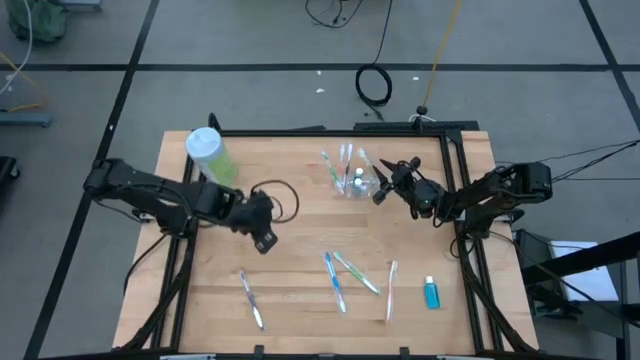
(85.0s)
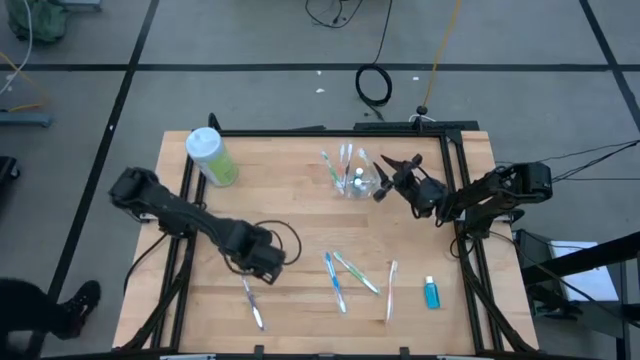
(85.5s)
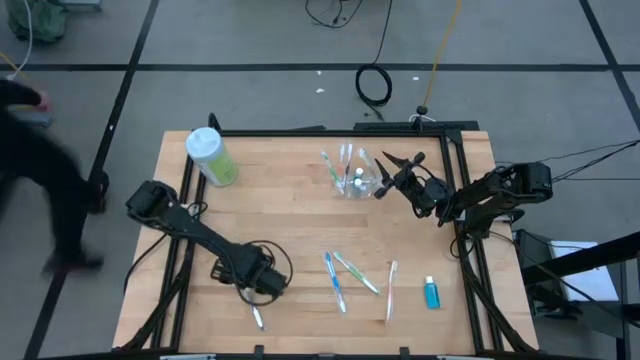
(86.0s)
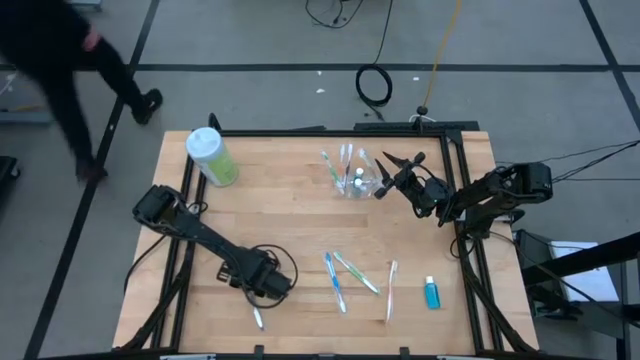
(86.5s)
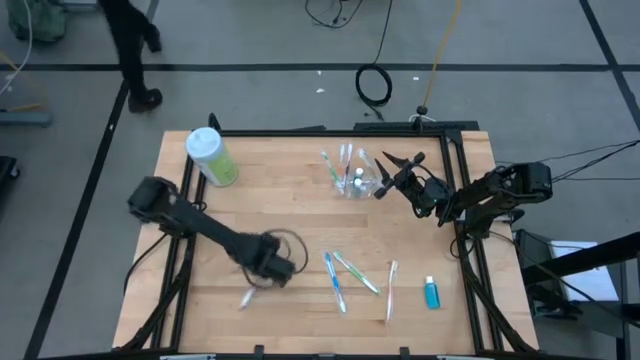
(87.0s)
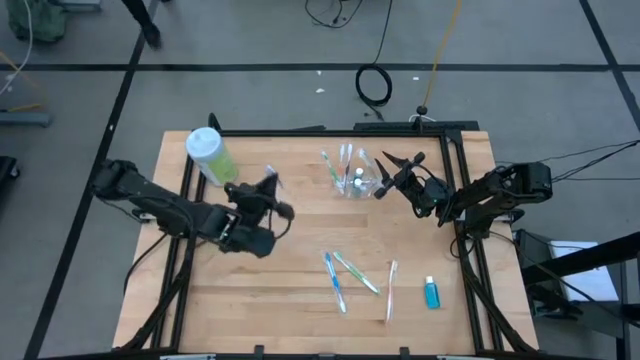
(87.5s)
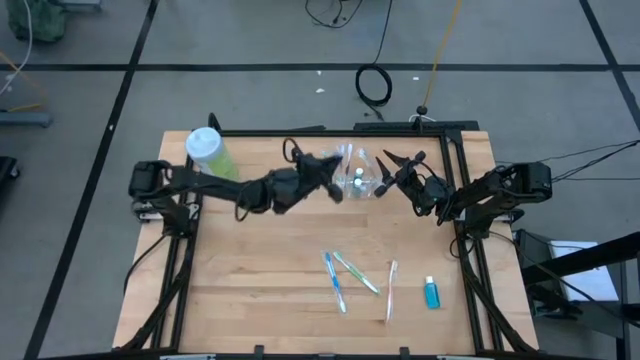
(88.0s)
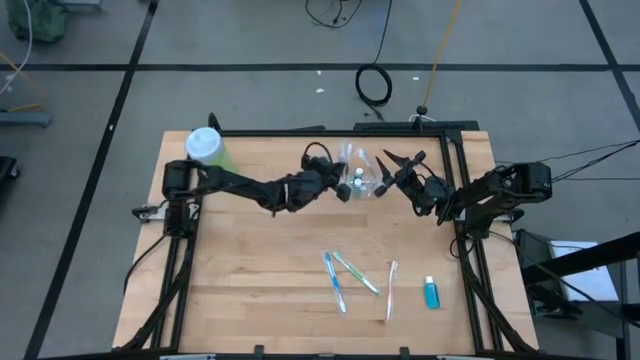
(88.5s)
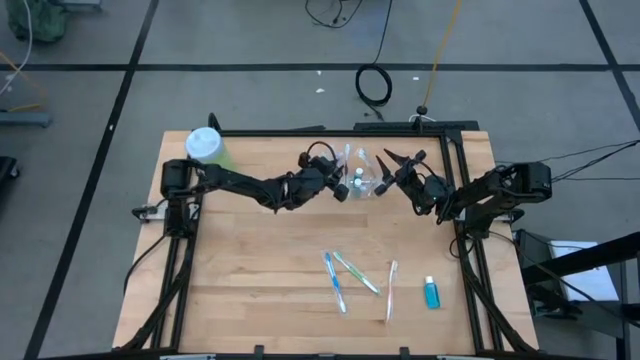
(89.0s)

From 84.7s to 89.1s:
Task: Pick & Place toothbrushing station
Put the violet toothbrush into the transparent organizer

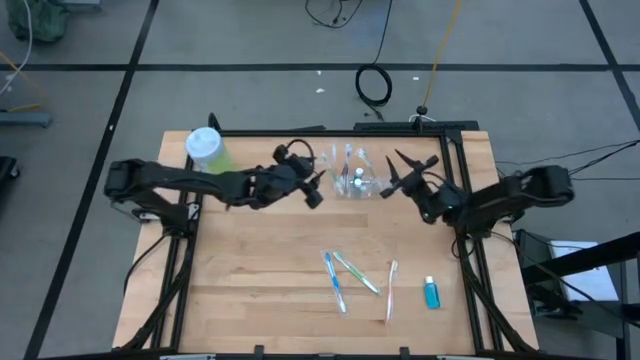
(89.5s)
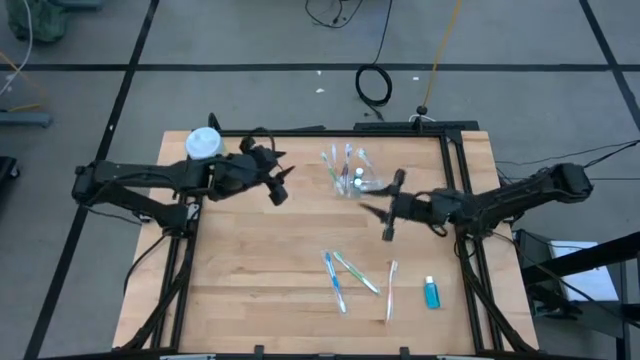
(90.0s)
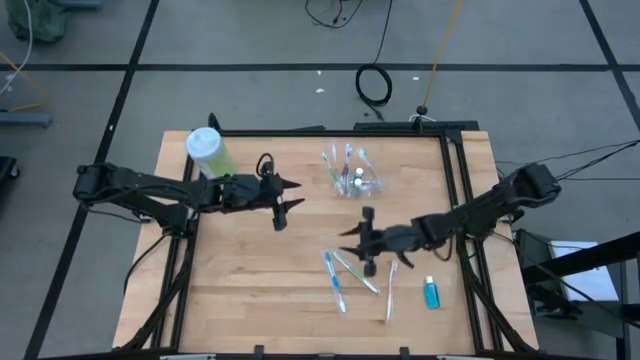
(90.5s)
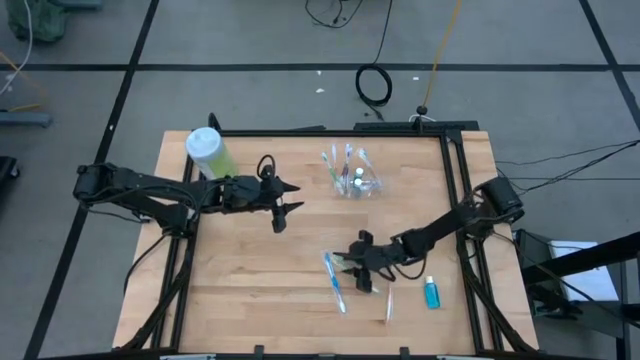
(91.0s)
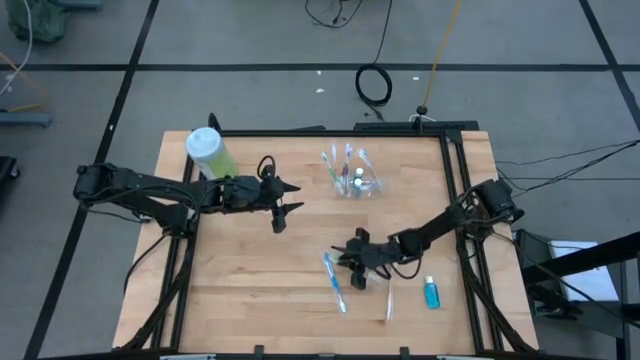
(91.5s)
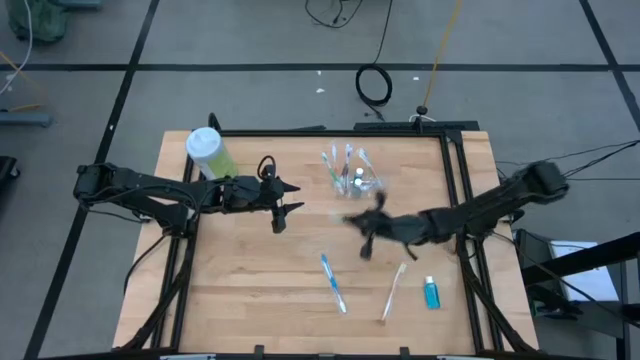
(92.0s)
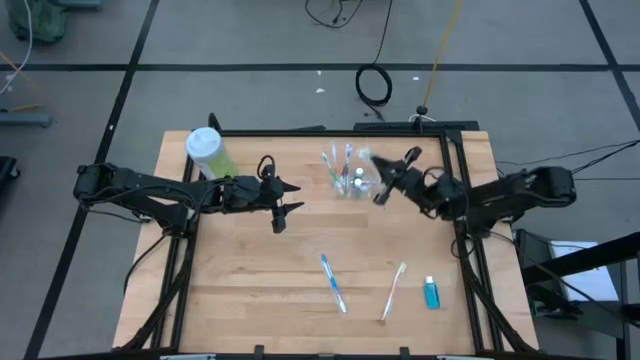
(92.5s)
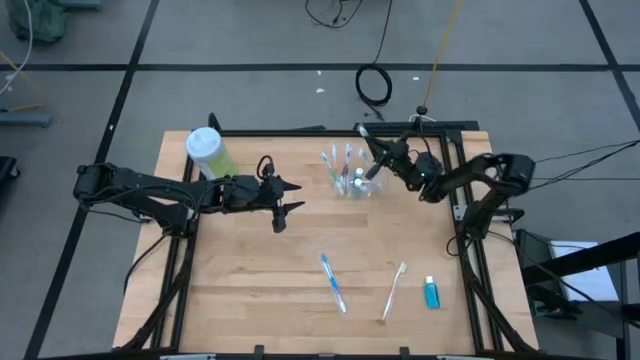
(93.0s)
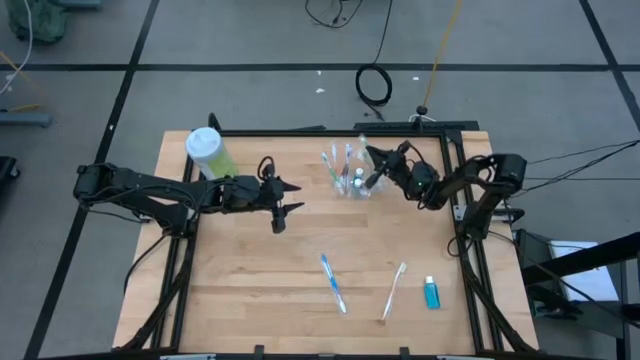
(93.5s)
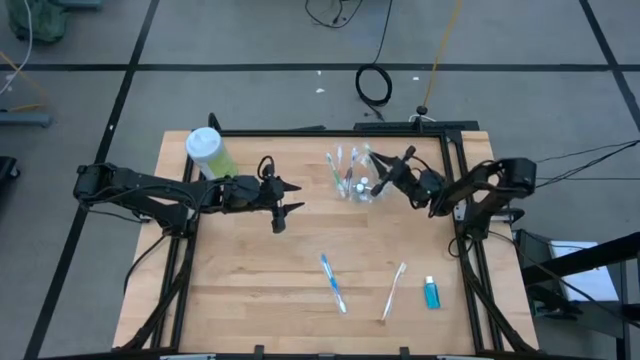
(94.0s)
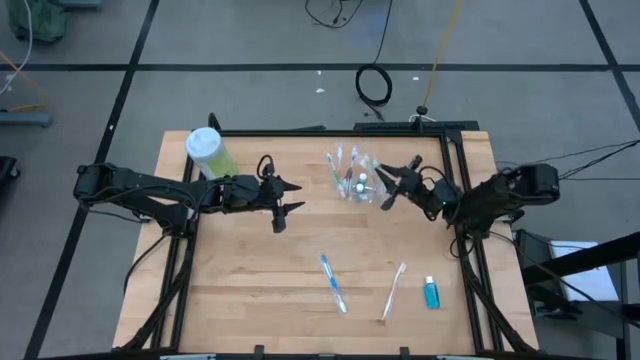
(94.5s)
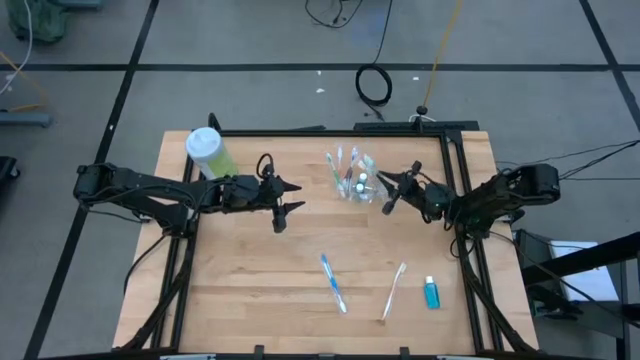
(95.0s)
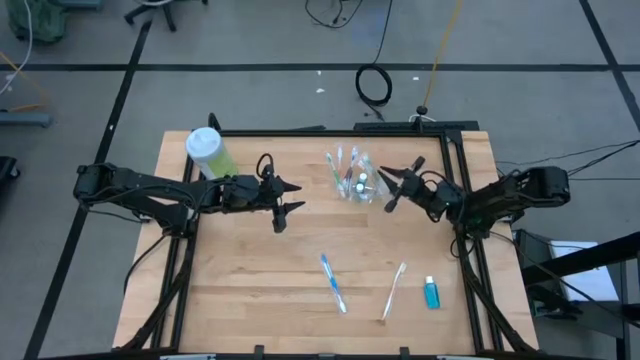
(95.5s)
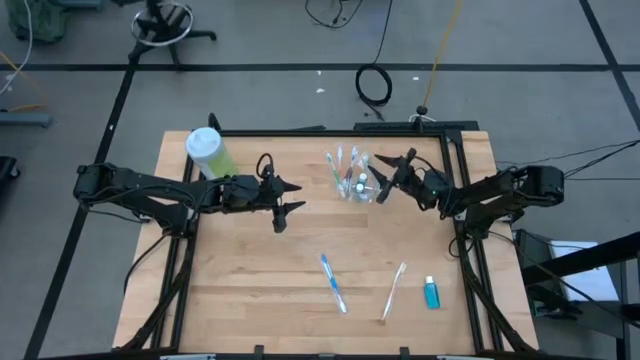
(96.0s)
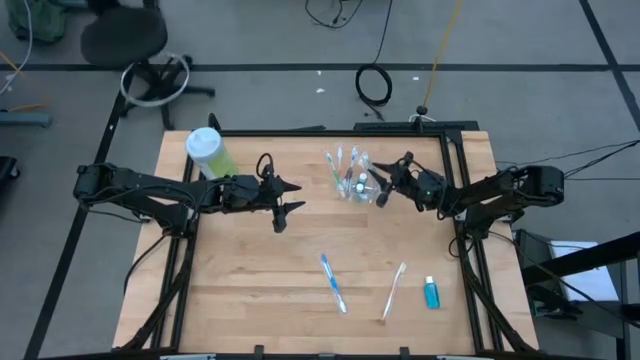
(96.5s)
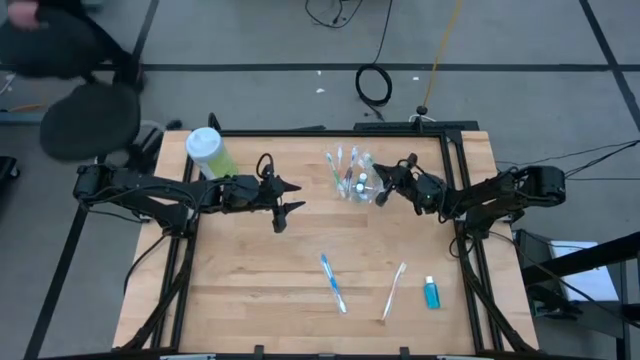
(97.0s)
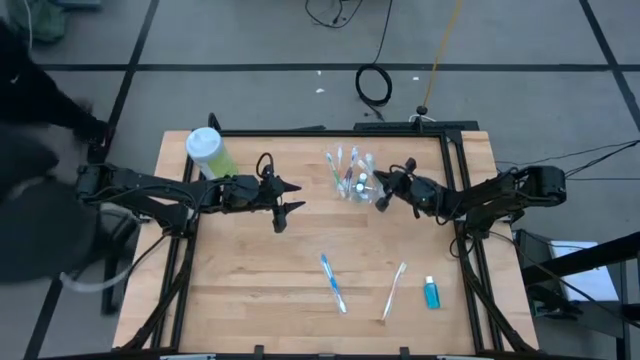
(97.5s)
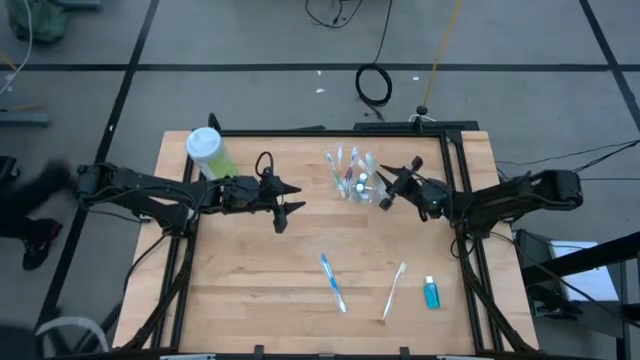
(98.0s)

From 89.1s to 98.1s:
Put the green toothbrush into the transparent organizer

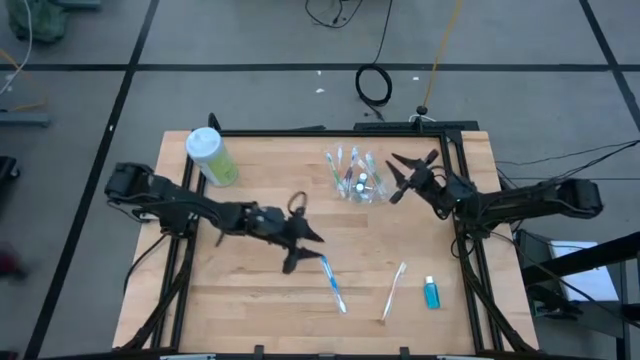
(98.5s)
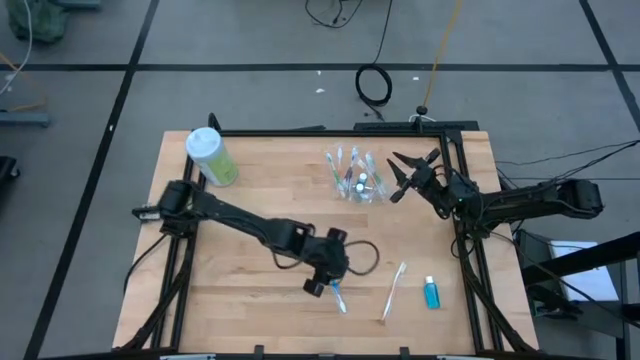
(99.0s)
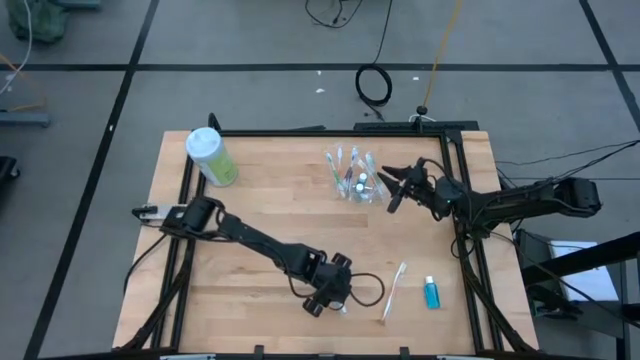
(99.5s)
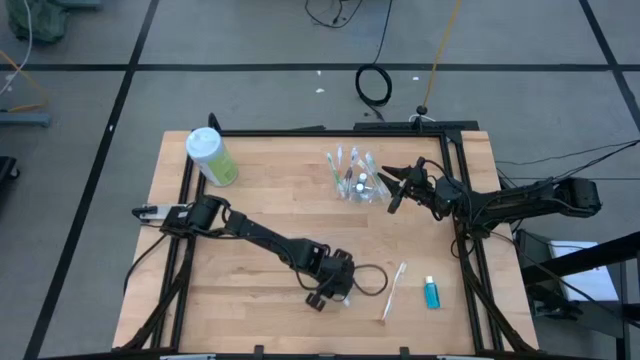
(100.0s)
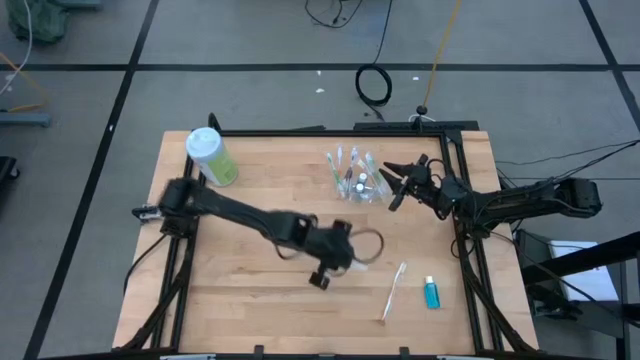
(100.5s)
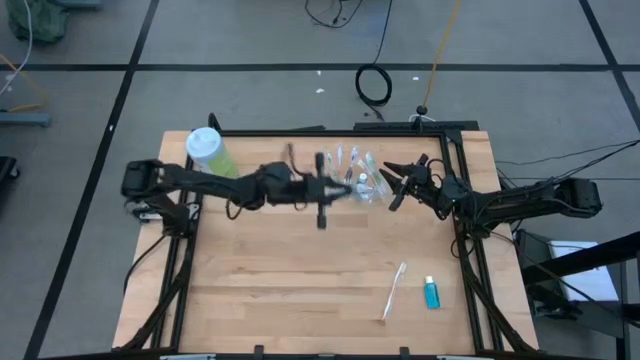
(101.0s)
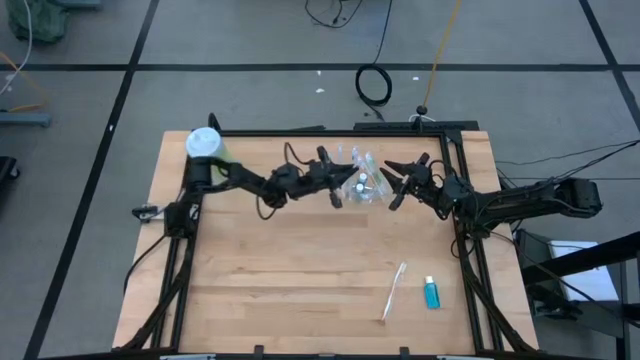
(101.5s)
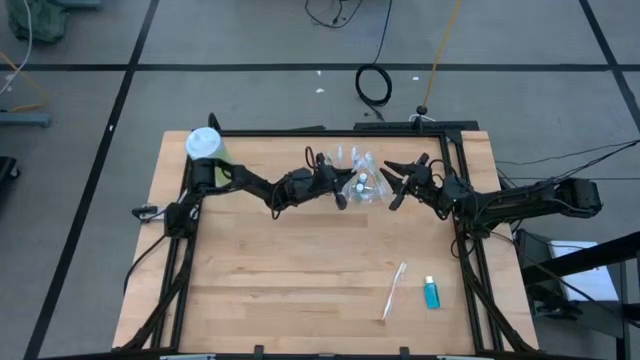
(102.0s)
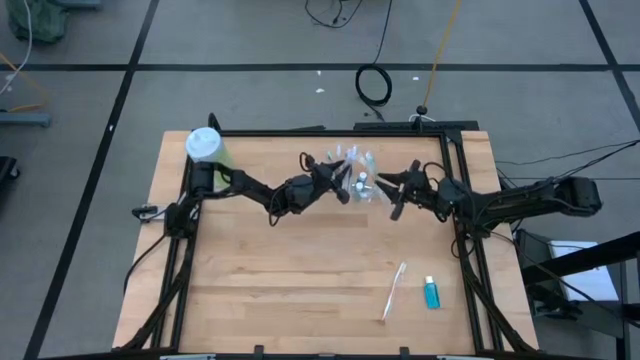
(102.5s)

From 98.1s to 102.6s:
Put the blue toothbrush into the transparent organizer

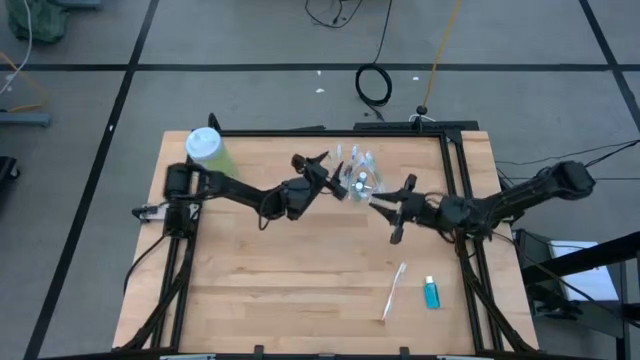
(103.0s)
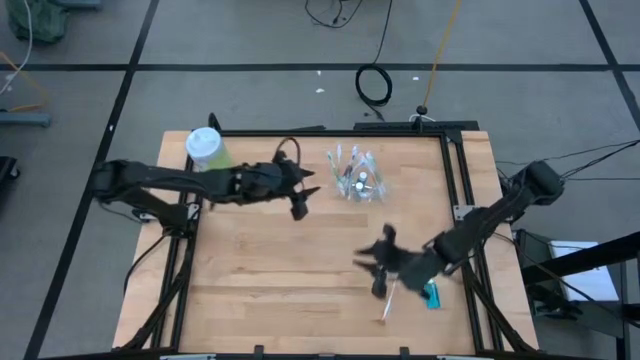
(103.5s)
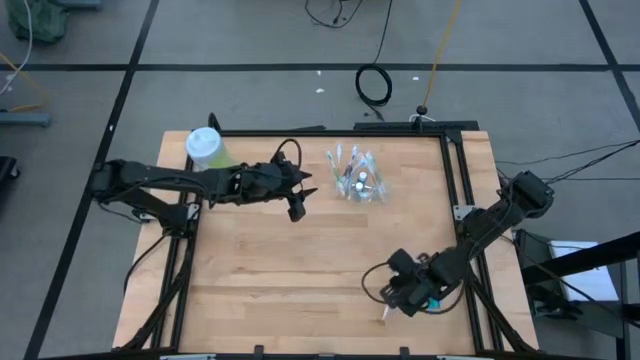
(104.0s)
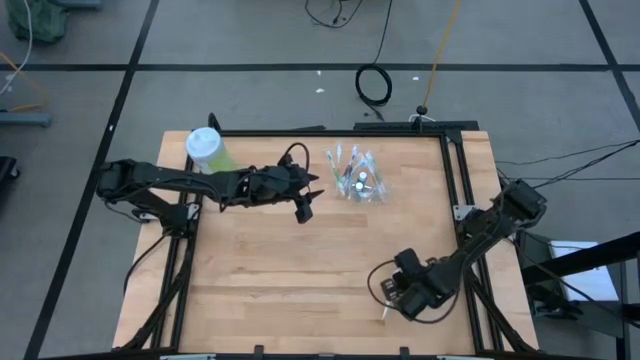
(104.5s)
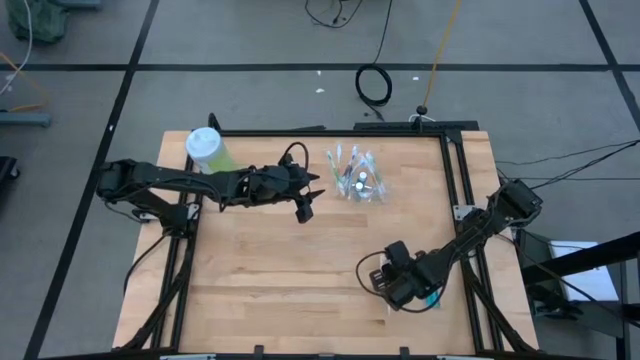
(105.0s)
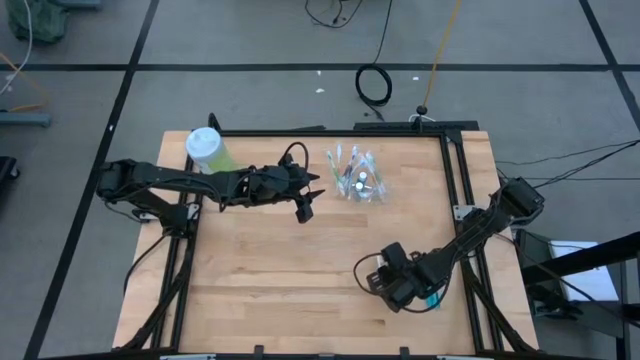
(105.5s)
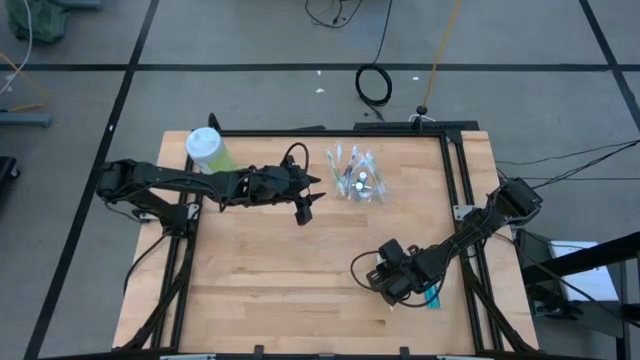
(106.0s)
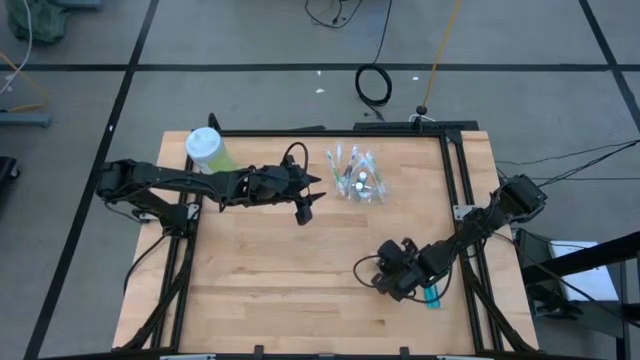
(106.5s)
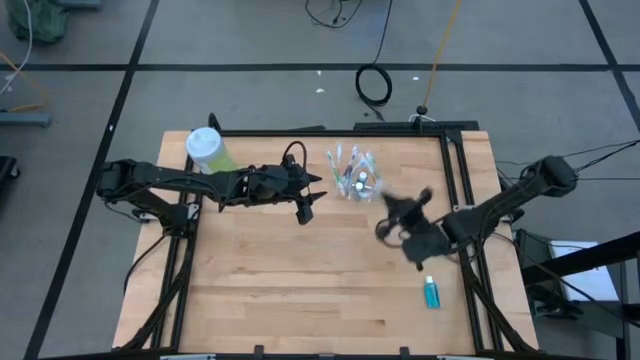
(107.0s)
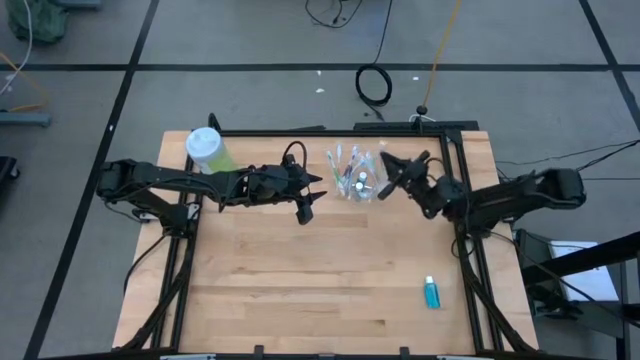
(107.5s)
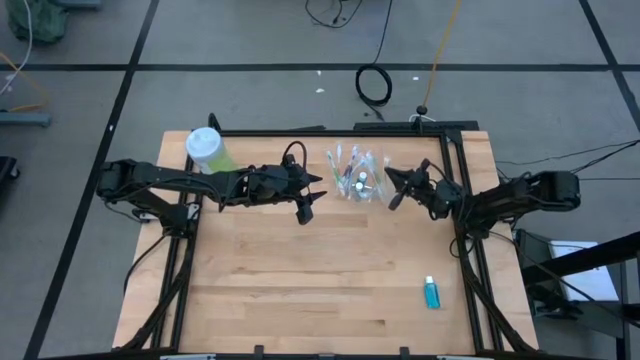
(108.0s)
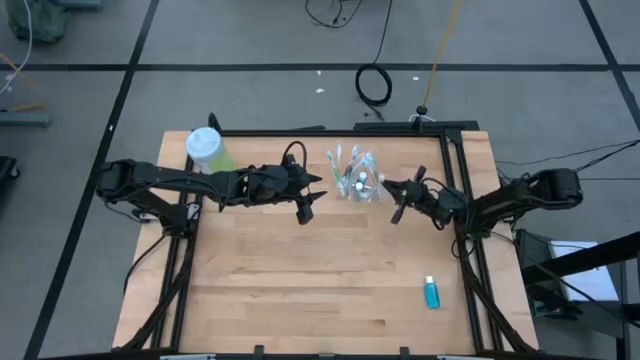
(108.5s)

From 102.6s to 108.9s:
Put the orange toothbrush into the transparent organizer
